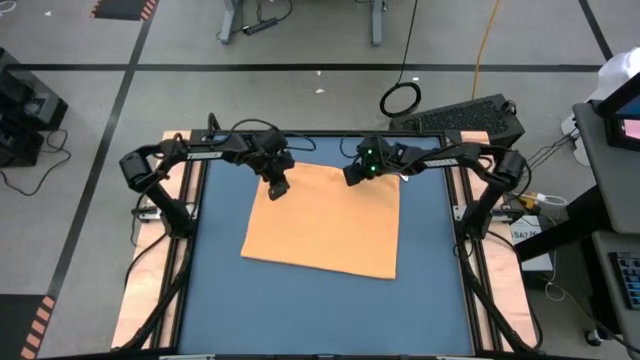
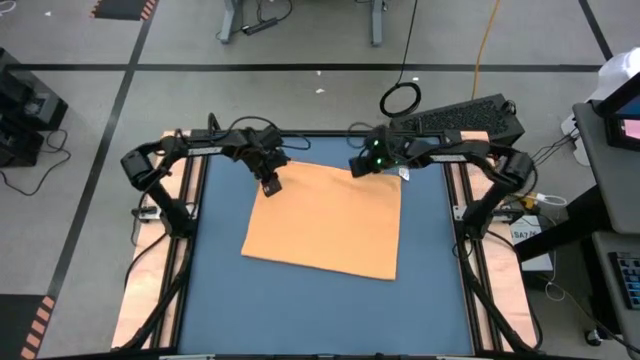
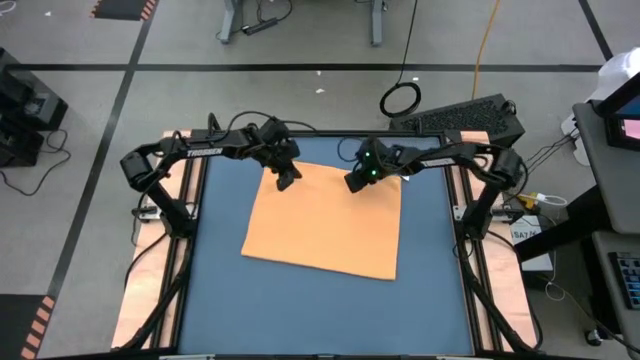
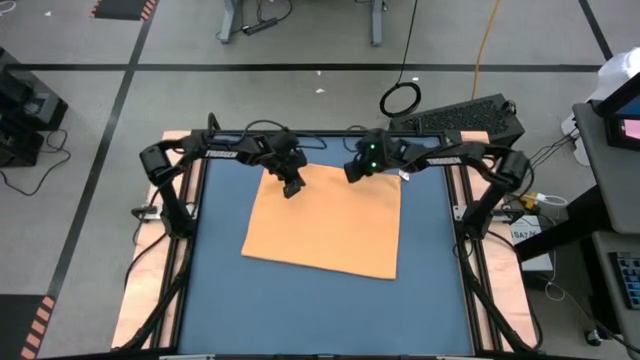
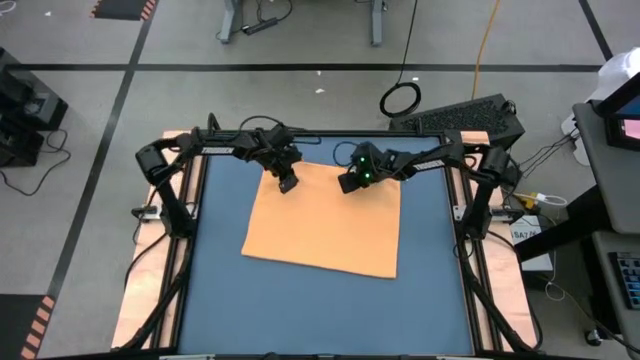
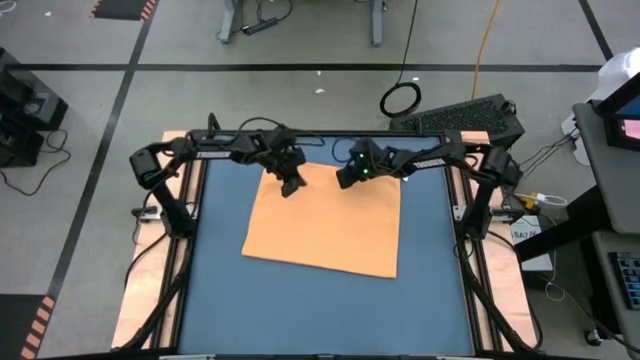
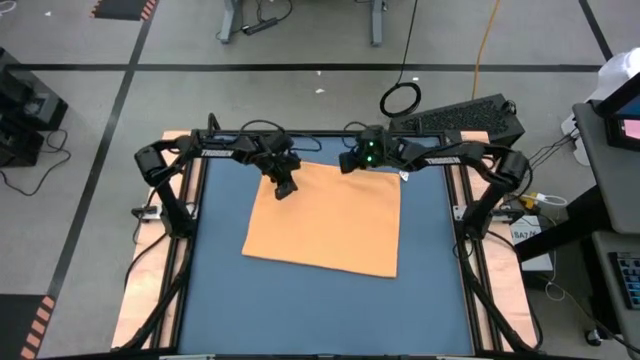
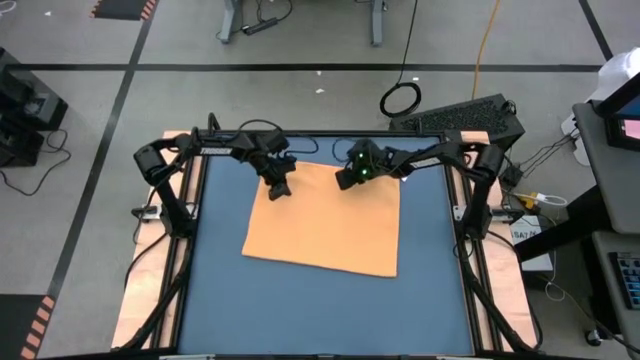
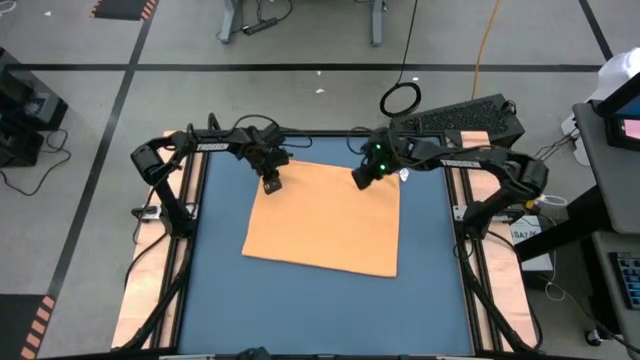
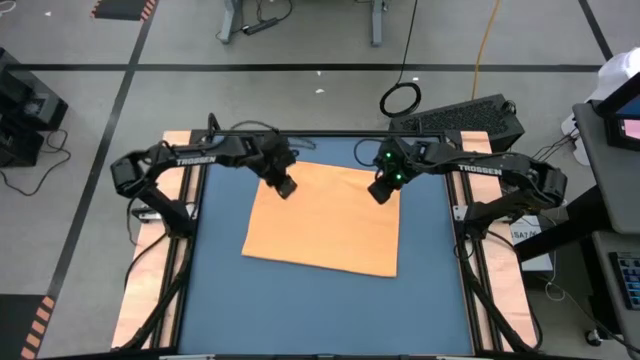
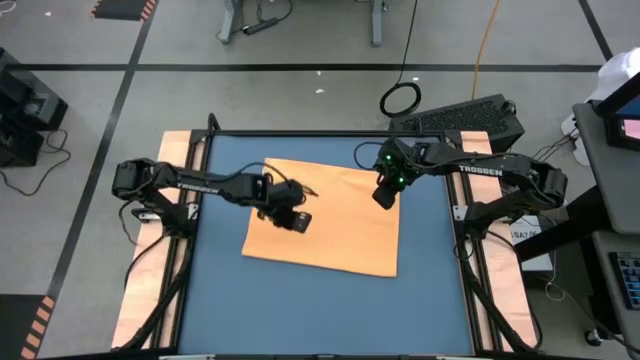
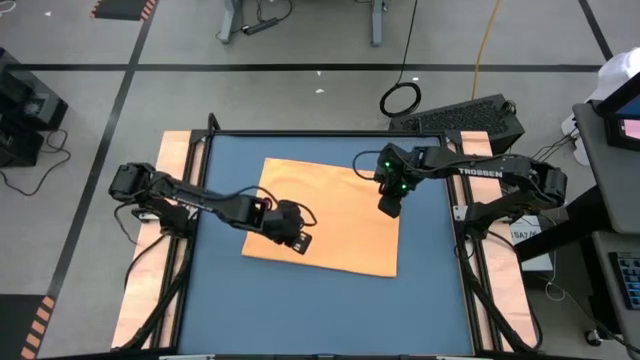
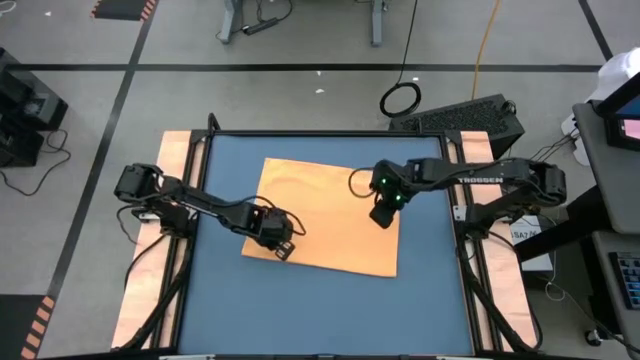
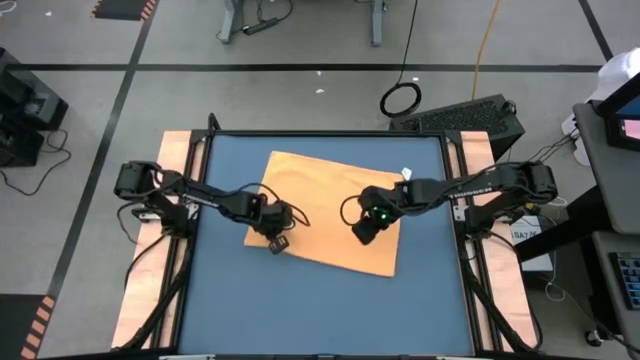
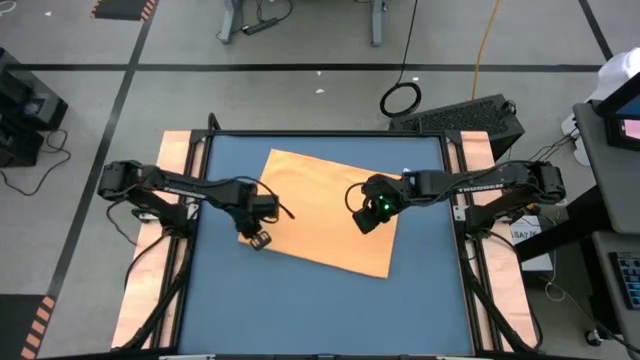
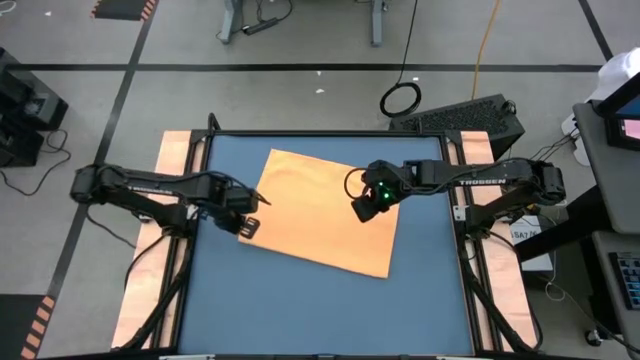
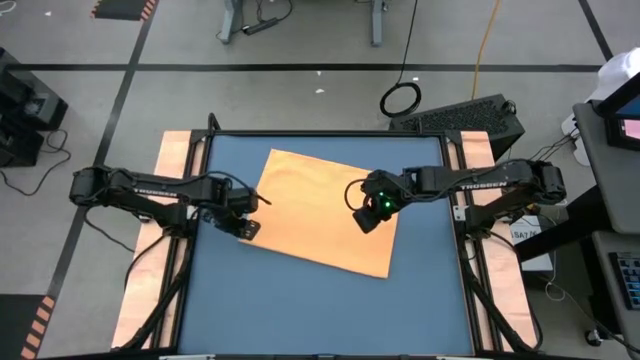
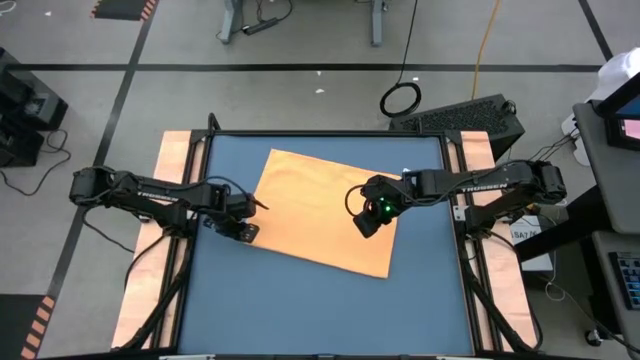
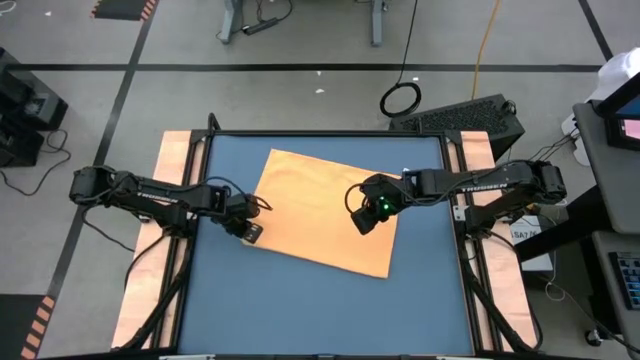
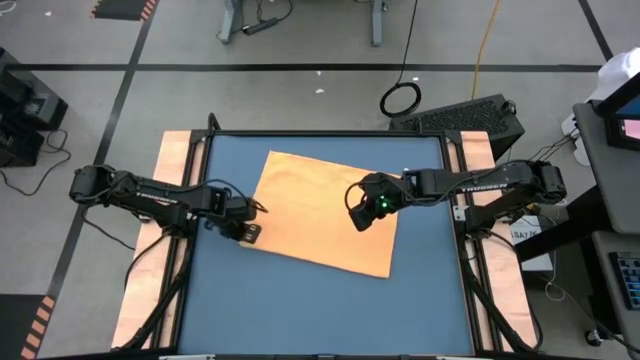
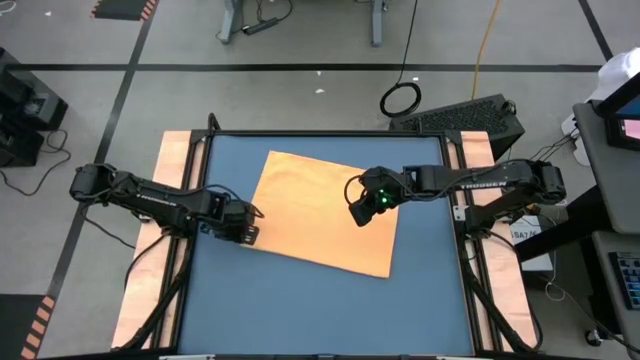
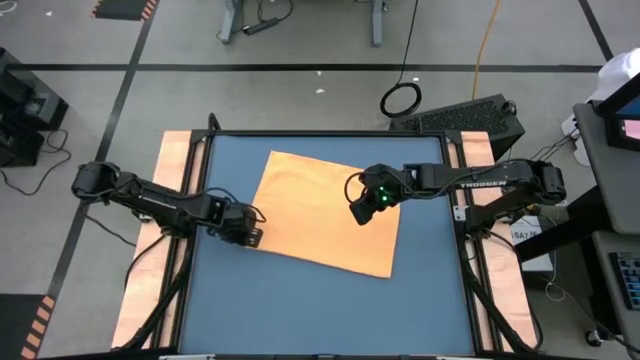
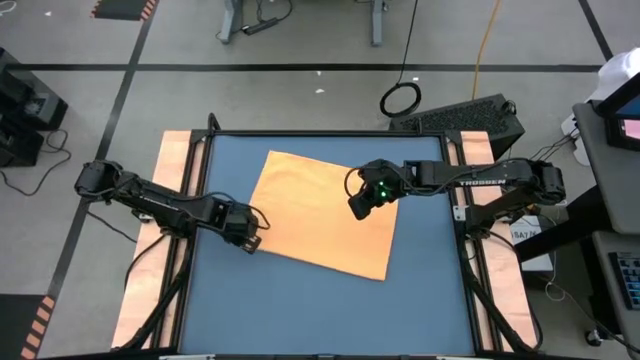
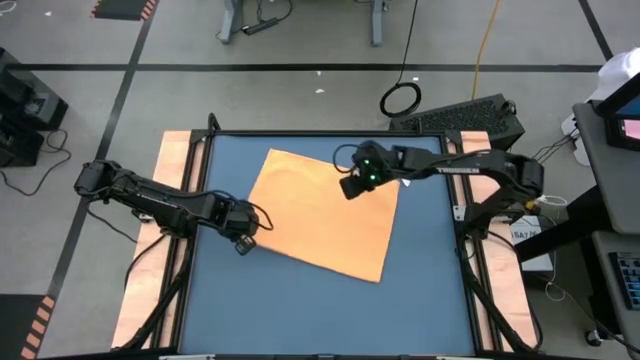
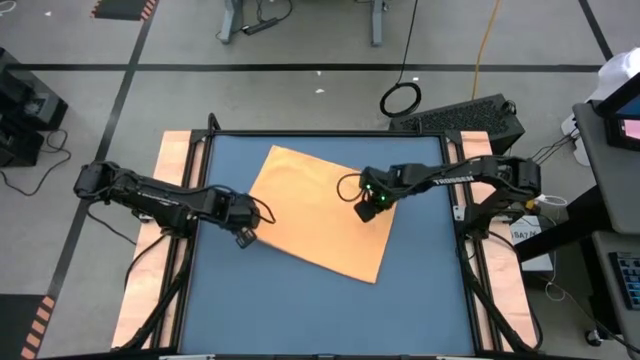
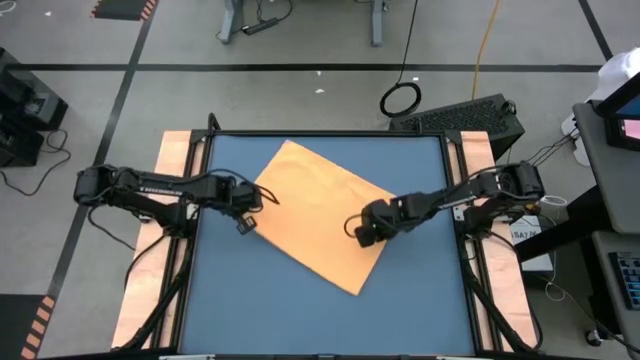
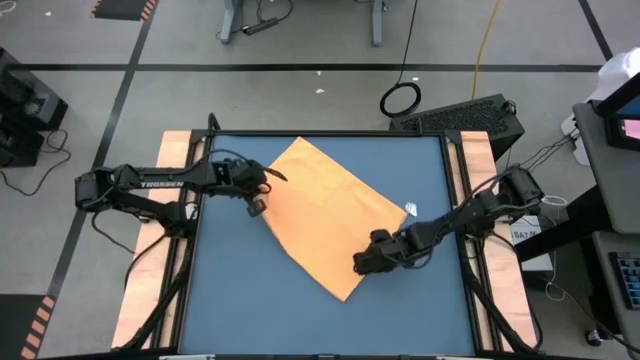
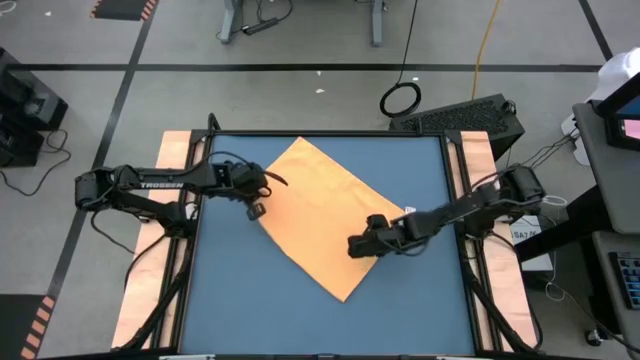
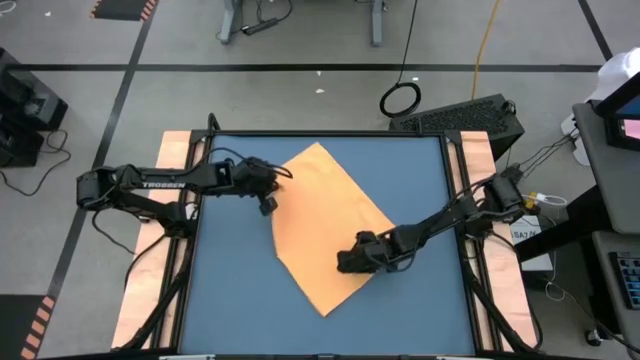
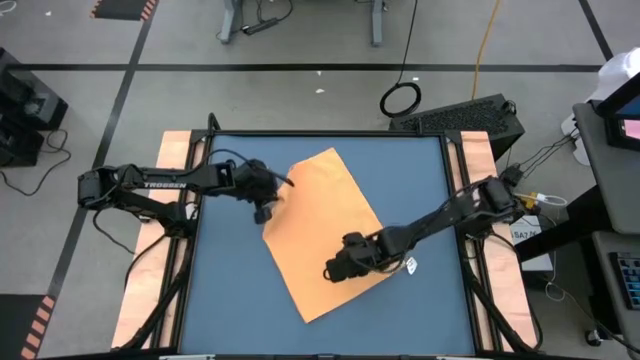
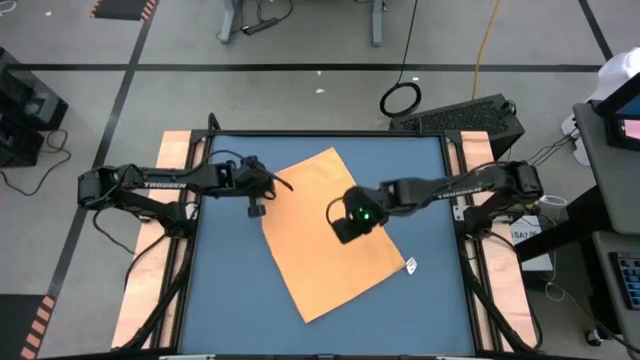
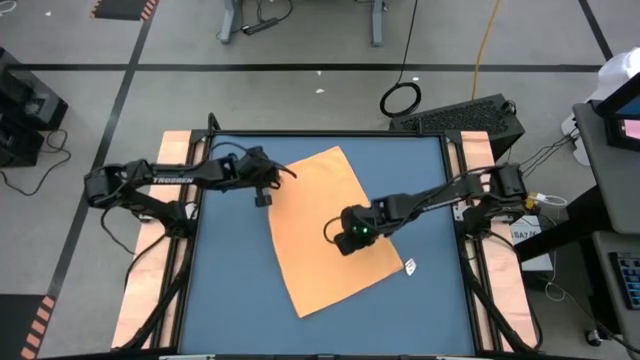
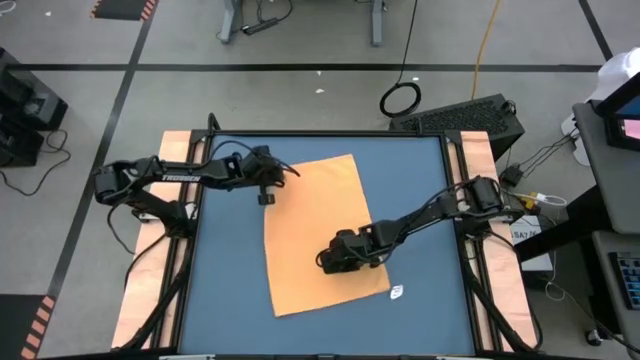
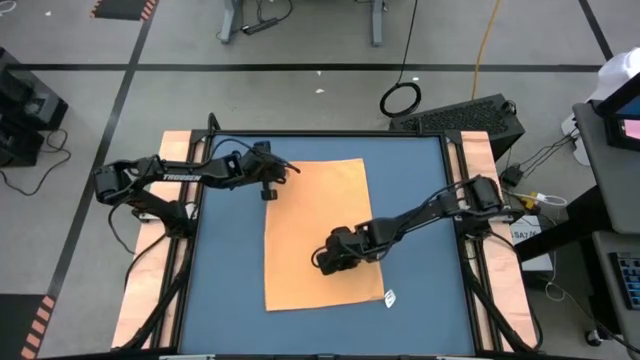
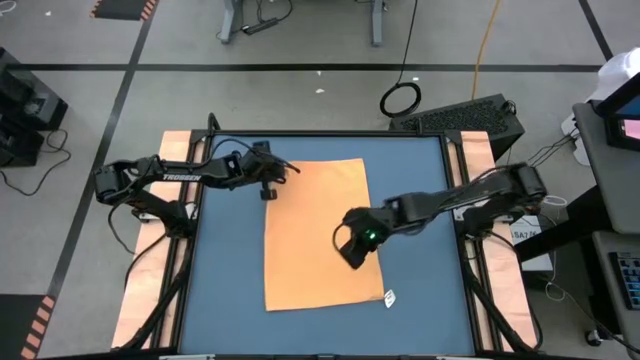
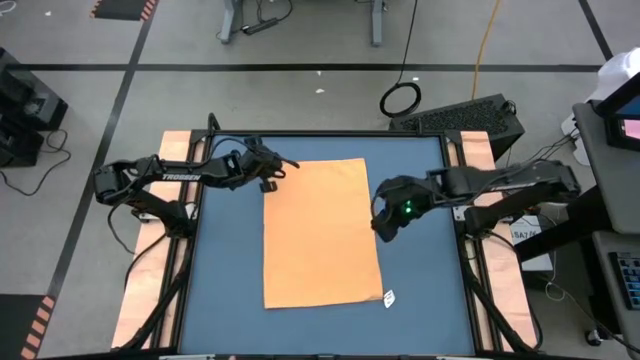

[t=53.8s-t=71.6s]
Task: Roll towel
Roll the yellow towel

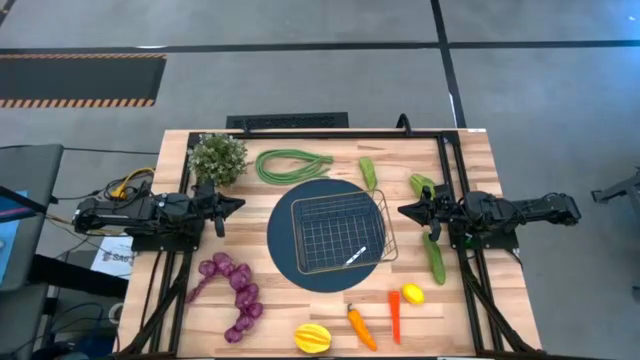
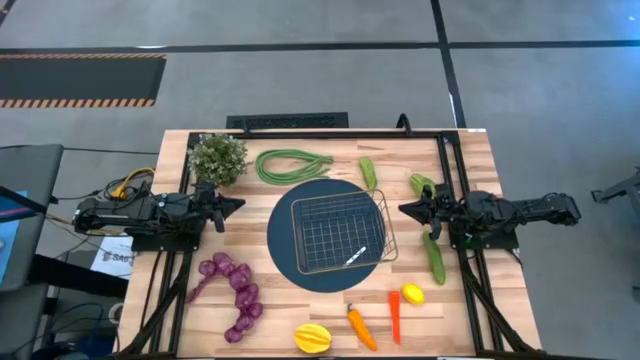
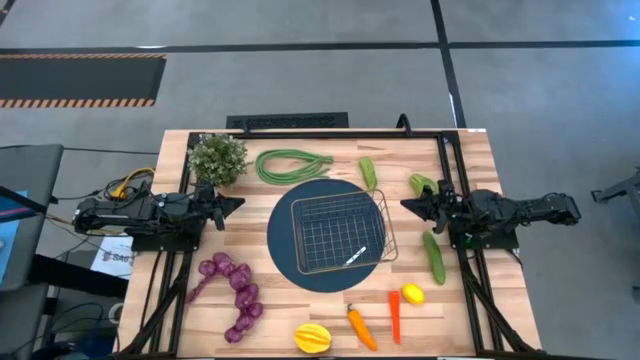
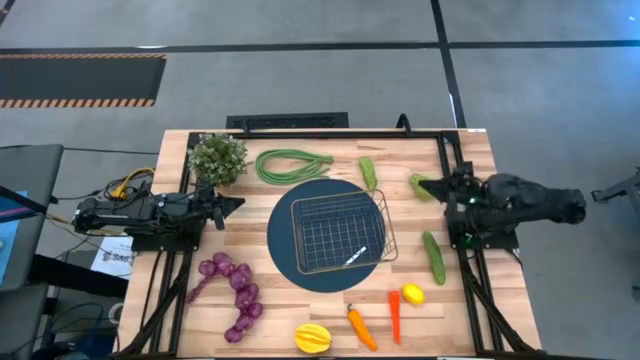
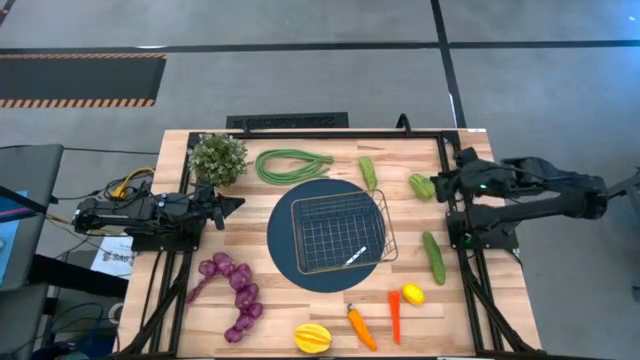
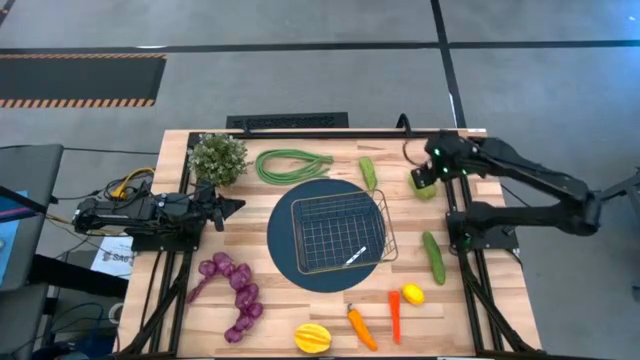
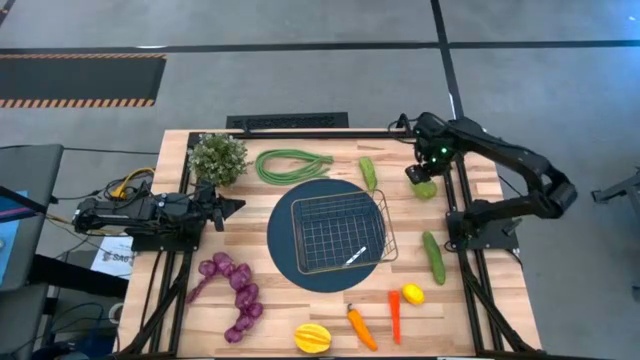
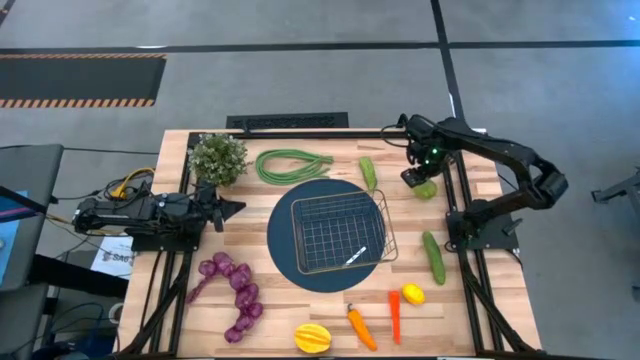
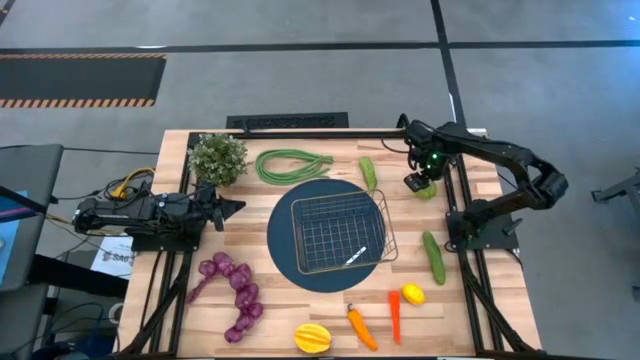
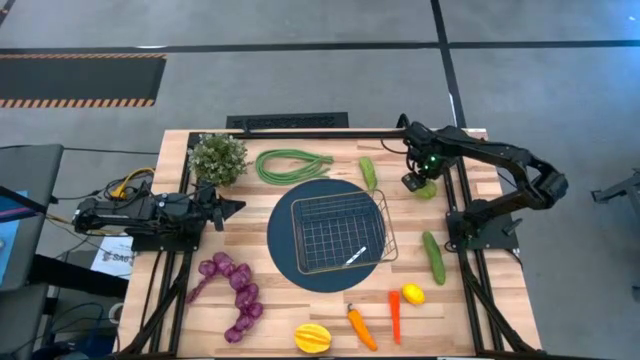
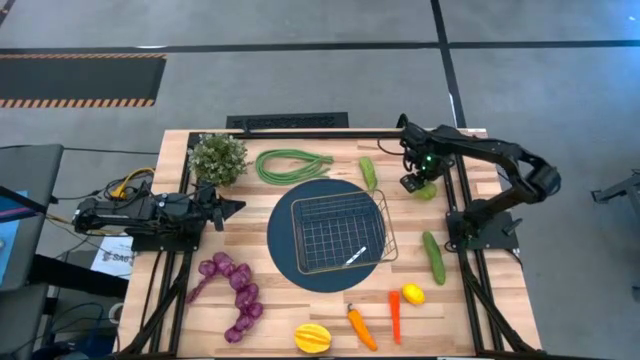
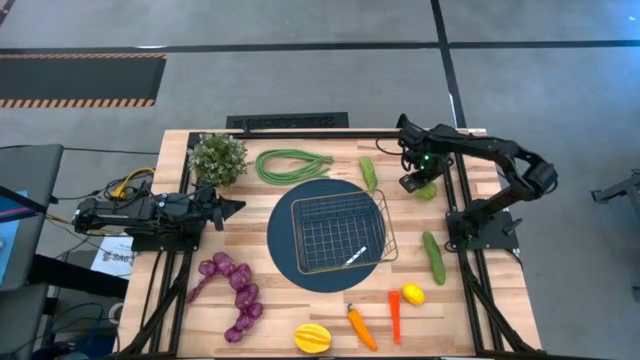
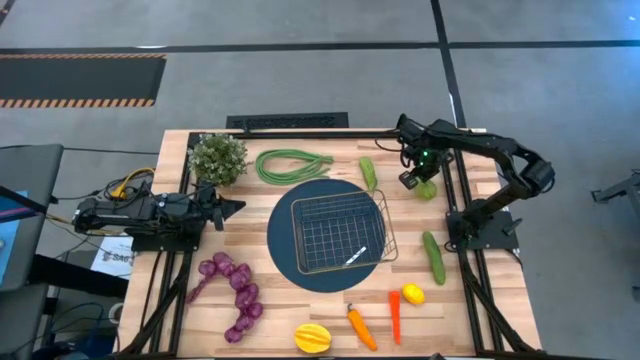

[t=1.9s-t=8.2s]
Task: Build produce basket
Put the green chayote into the gold wire basket
